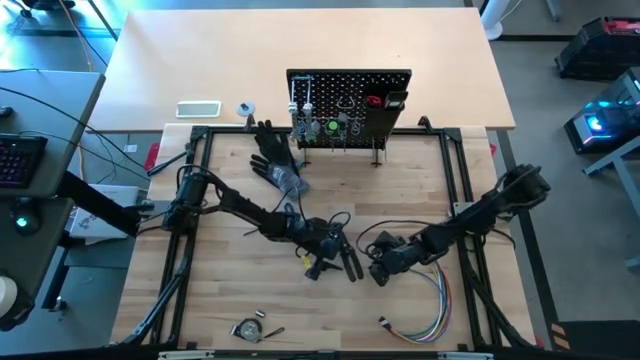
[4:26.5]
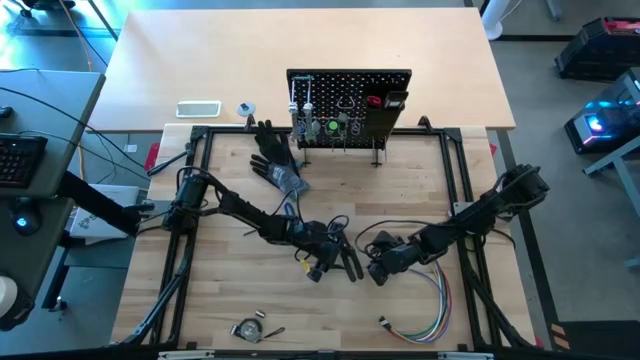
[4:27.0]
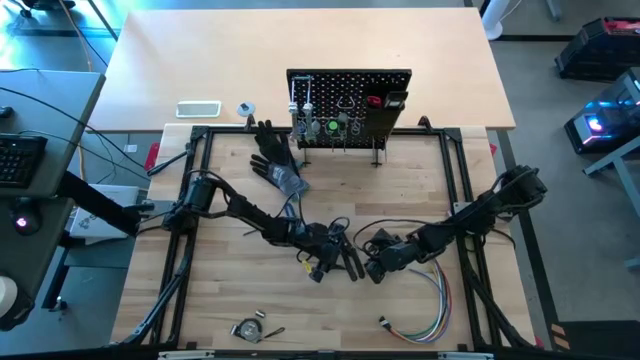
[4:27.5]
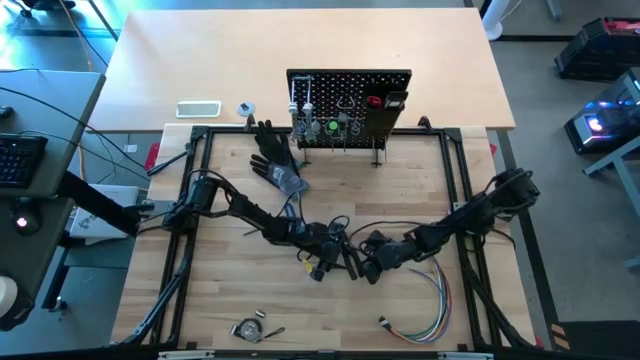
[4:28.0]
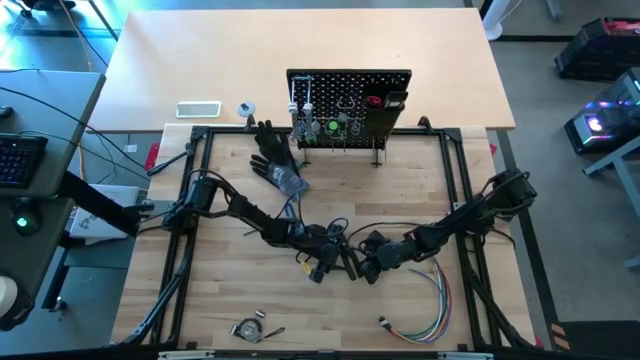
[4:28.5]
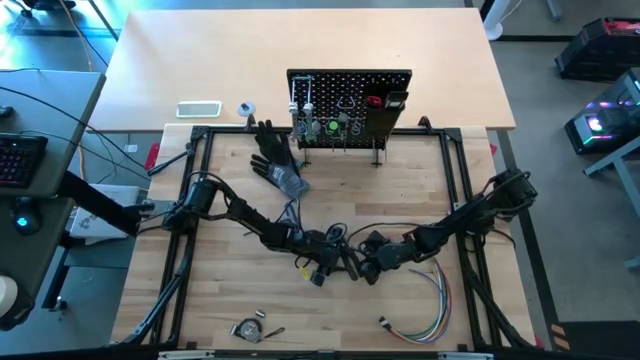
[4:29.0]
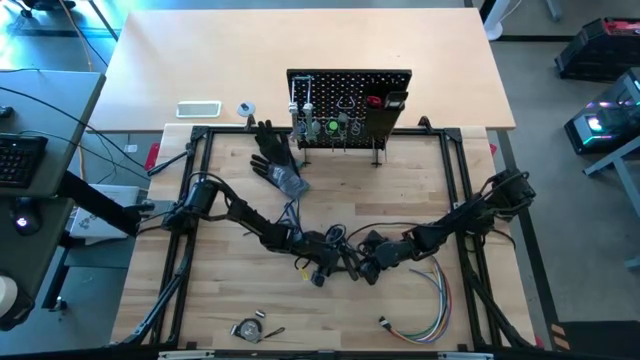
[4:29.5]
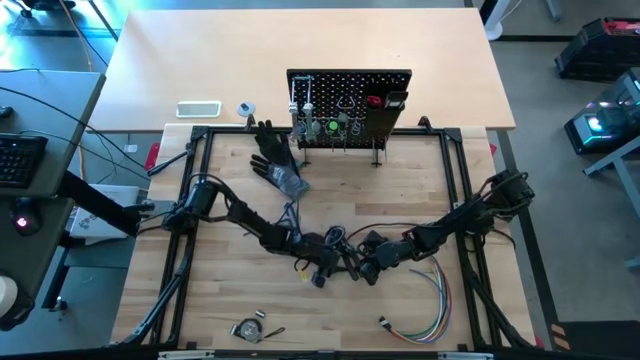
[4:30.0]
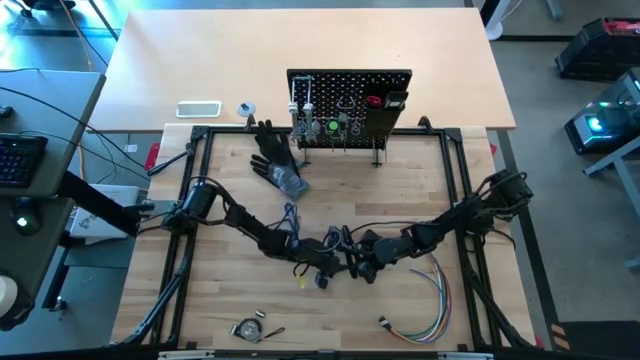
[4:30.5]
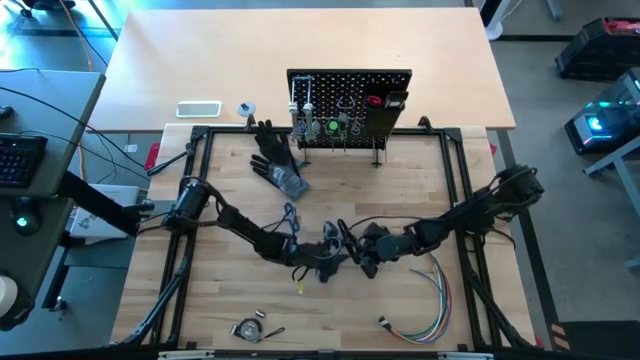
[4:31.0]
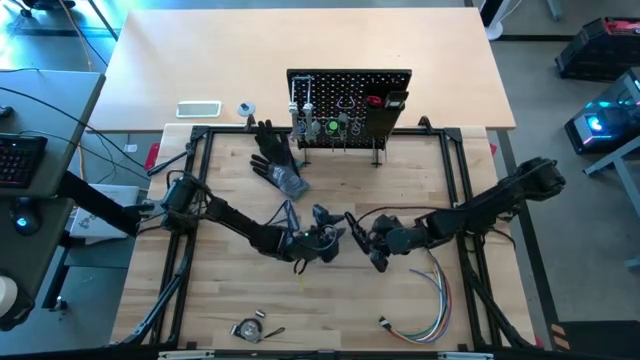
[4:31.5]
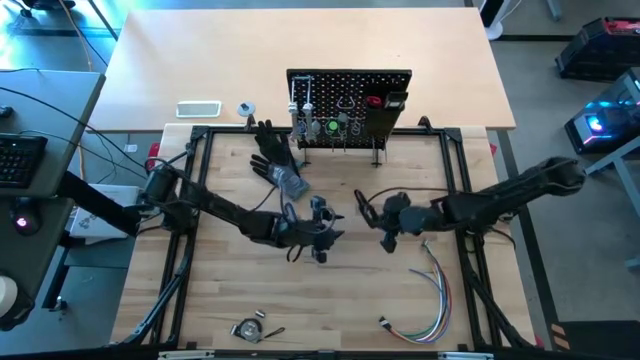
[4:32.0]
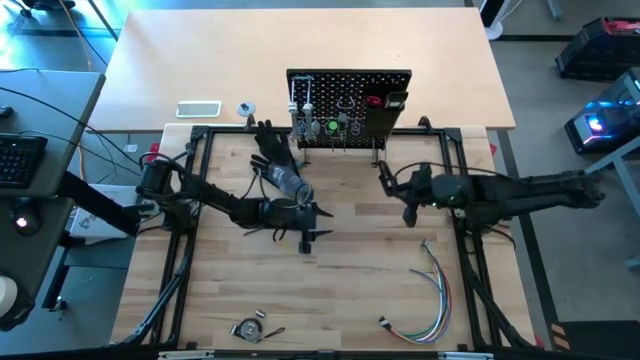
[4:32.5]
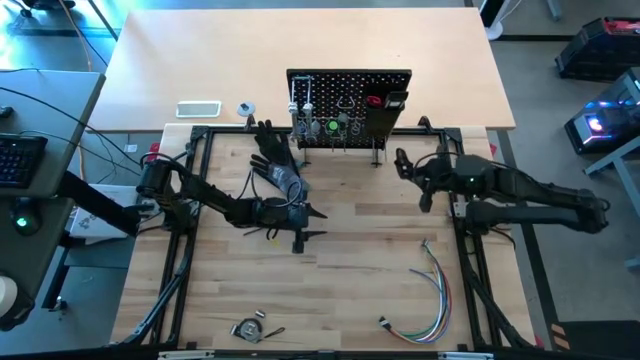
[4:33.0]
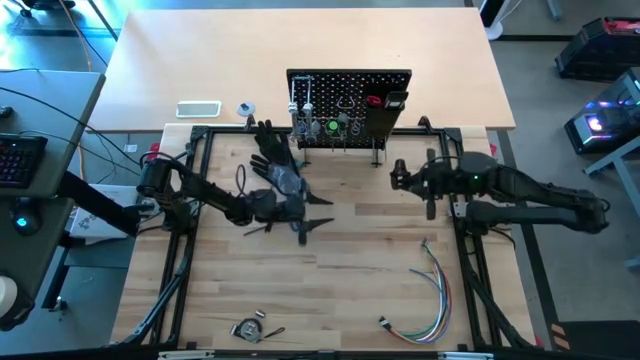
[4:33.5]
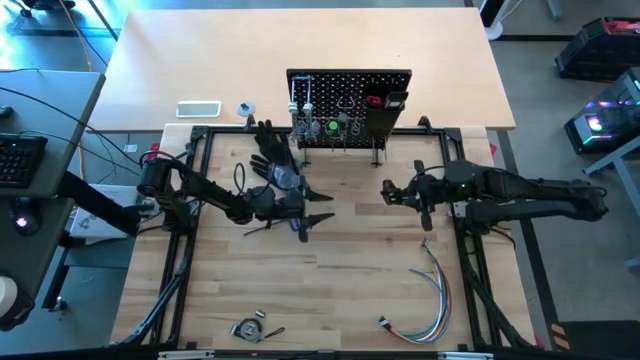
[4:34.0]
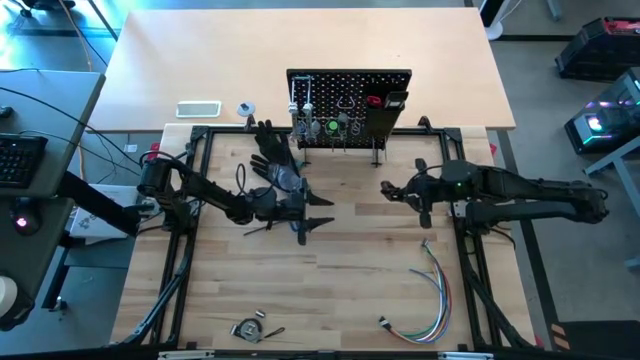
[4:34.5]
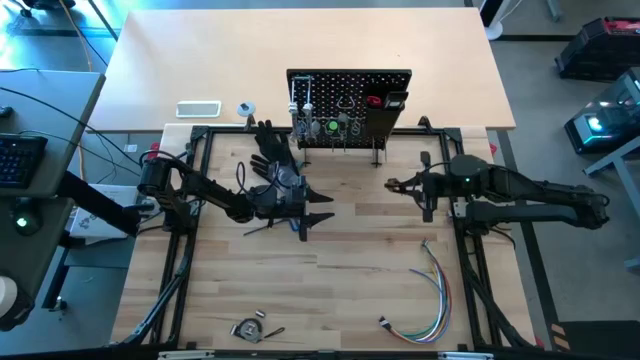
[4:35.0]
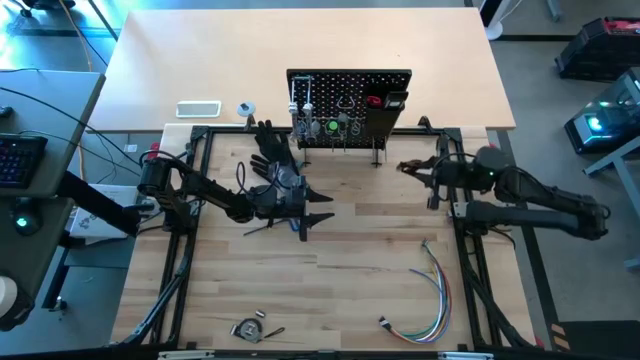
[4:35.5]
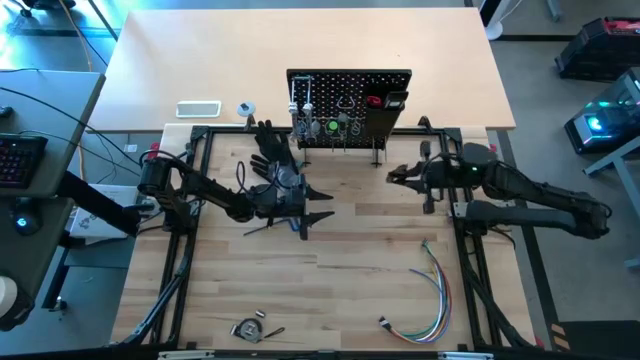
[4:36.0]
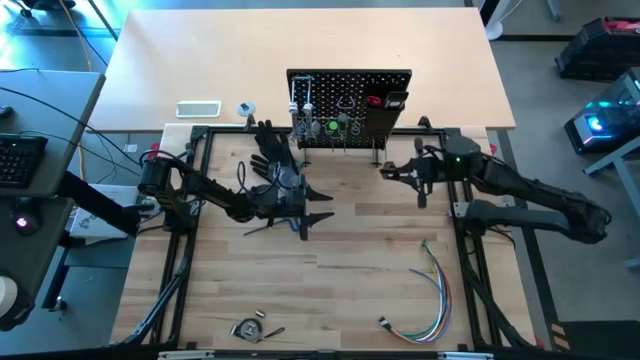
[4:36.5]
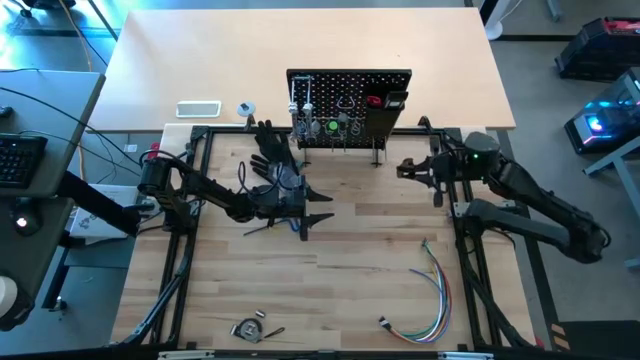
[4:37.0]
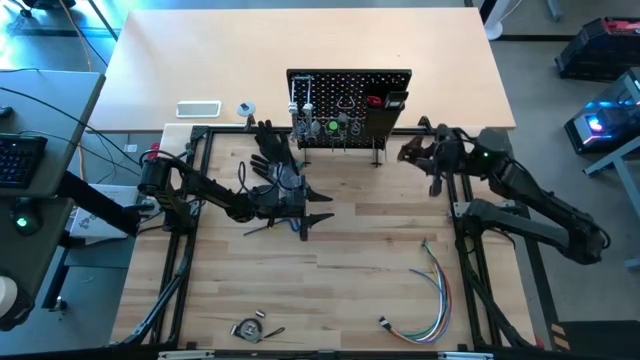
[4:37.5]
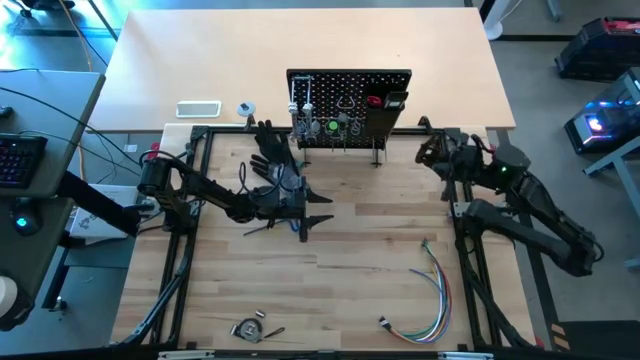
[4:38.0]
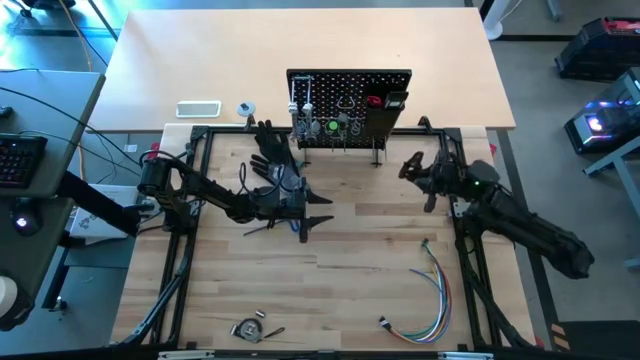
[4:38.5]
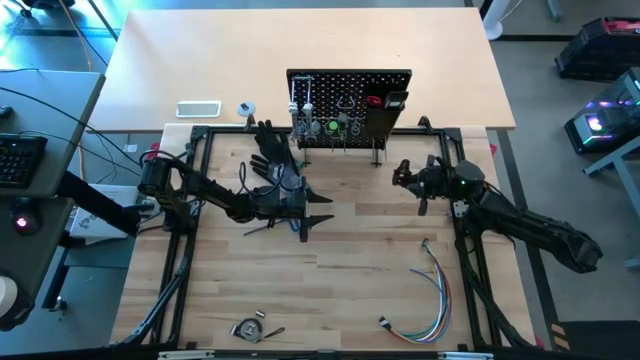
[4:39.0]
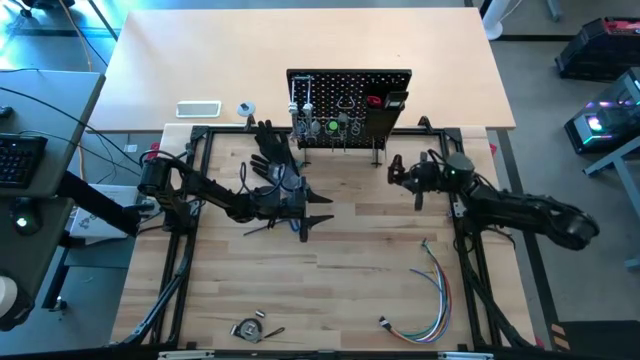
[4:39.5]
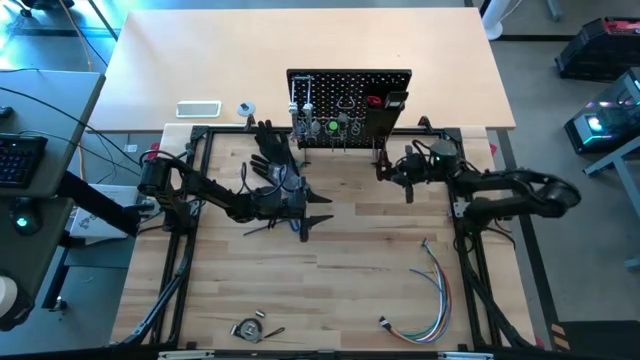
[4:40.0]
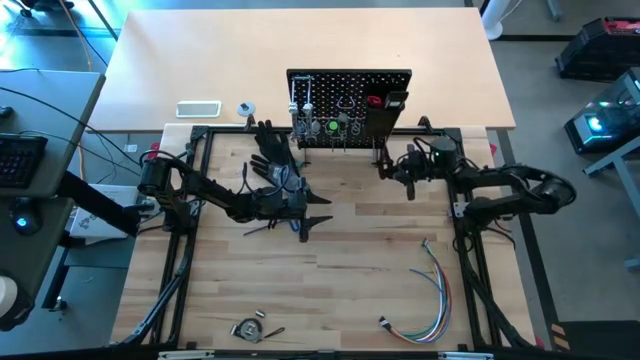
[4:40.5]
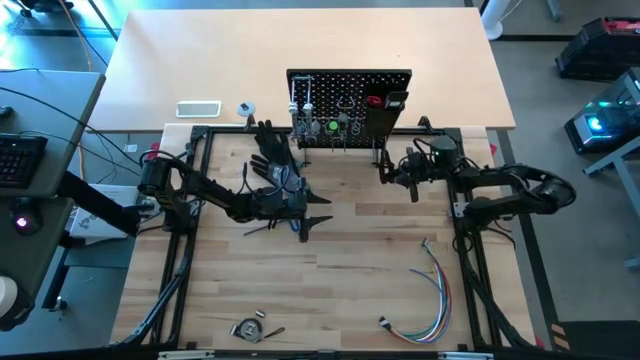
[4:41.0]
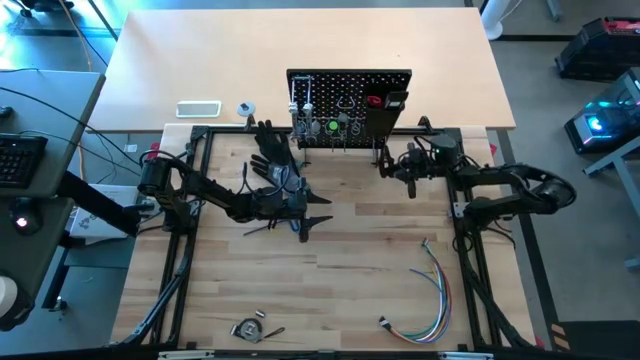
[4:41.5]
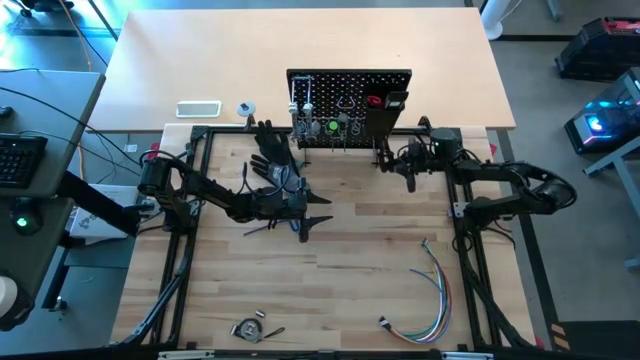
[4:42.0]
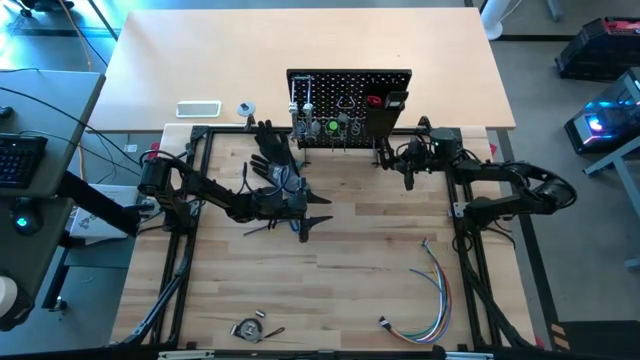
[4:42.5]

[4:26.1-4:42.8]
Task: Hang tools onto peg board
Hang the black pliers on the pegboard

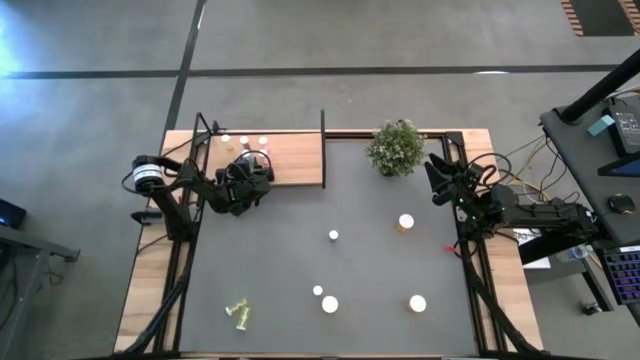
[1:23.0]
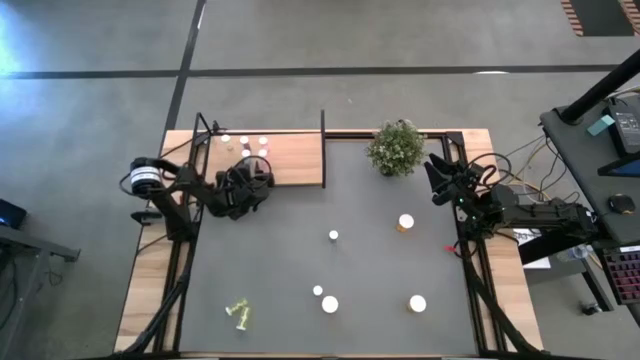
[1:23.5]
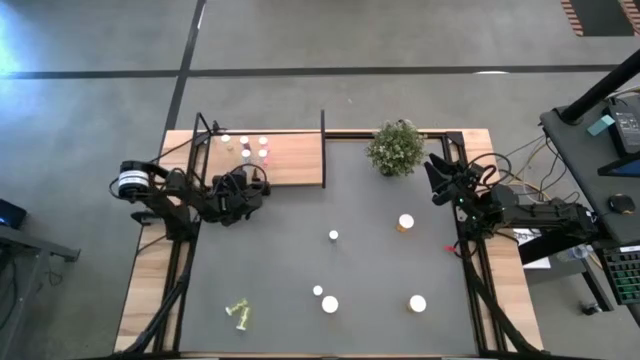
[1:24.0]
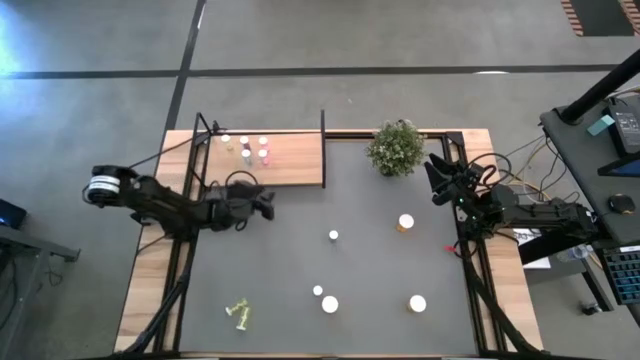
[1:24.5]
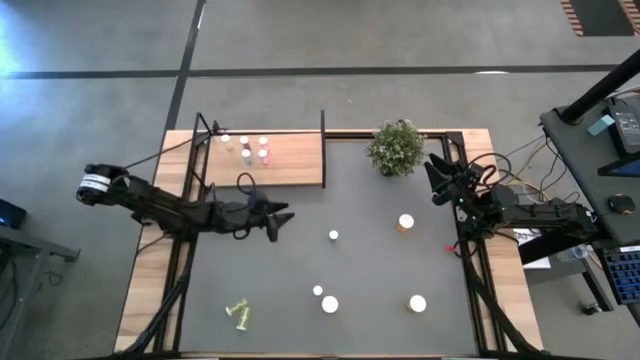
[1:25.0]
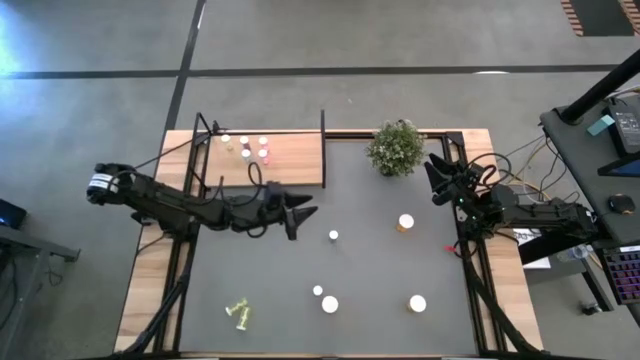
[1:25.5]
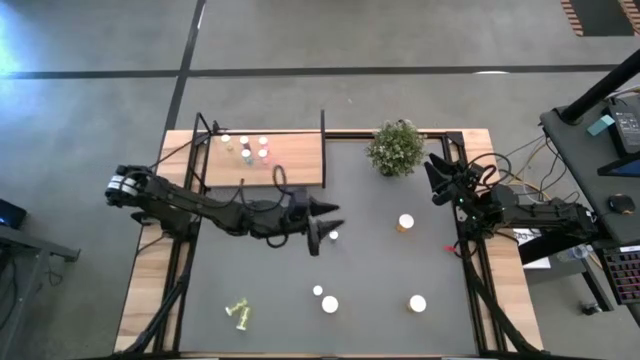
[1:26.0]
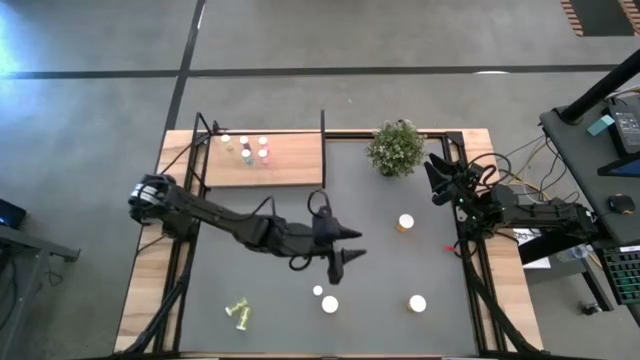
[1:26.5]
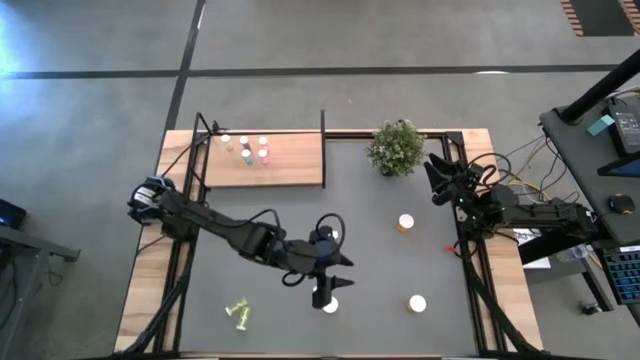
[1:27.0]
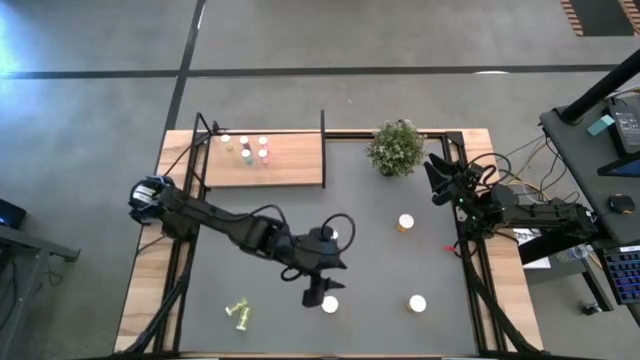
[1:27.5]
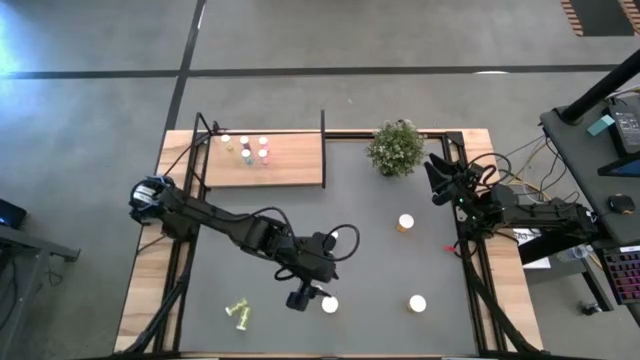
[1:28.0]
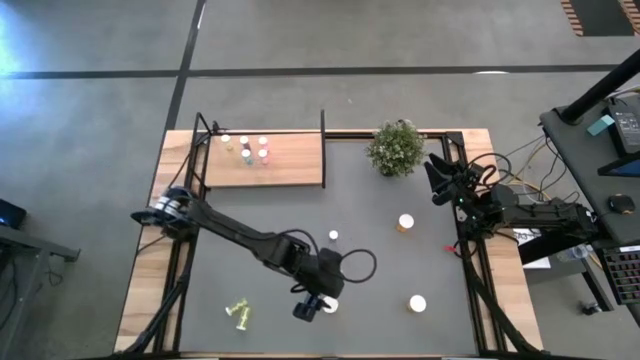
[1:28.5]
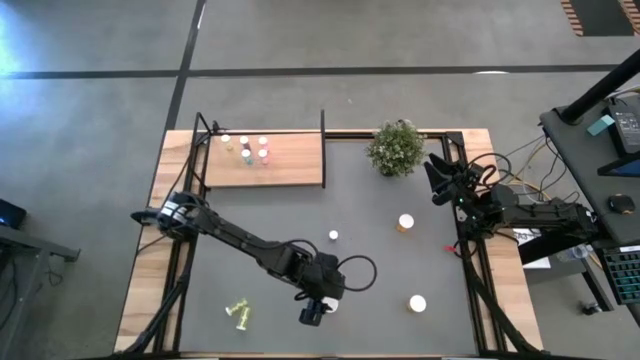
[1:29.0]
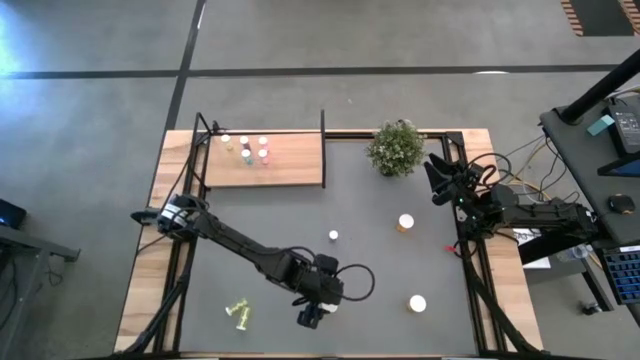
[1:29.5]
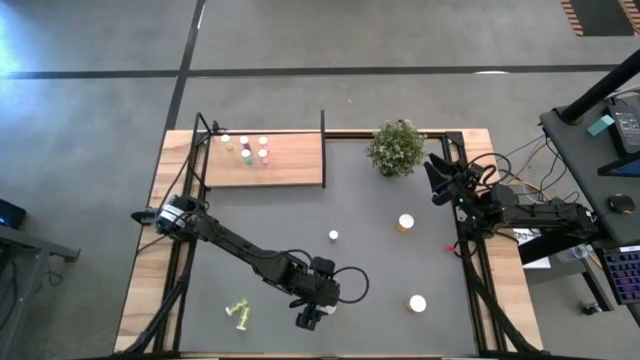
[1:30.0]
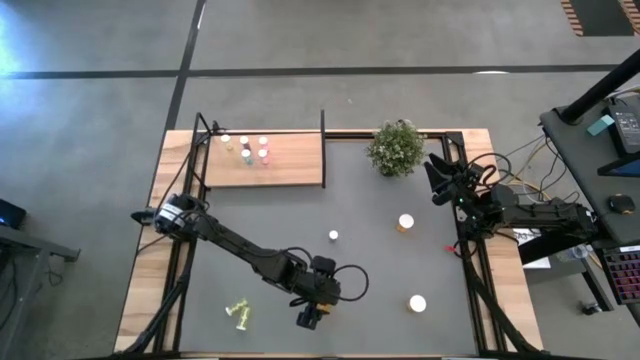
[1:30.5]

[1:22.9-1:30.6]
Task: Pick and place medicine bottles onto shelf by color
Put the bottom left orange pill bottle on the shelf
